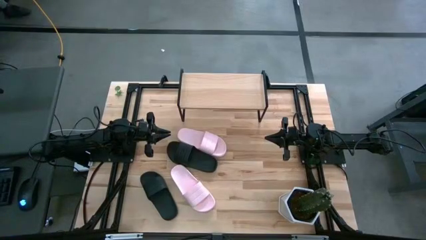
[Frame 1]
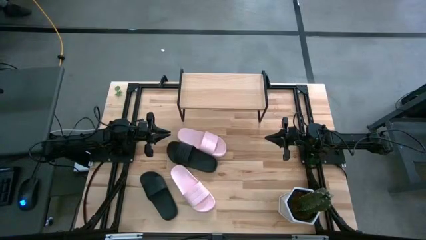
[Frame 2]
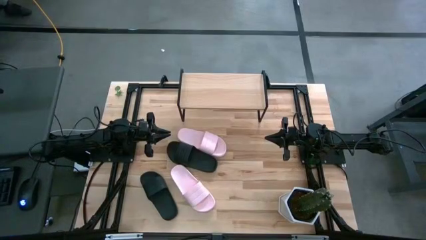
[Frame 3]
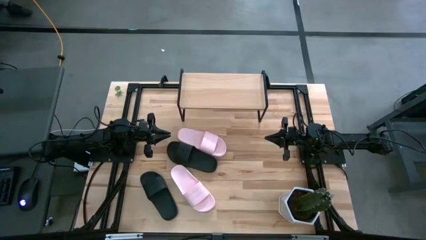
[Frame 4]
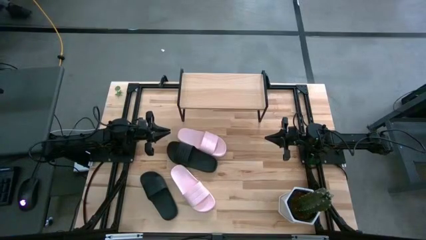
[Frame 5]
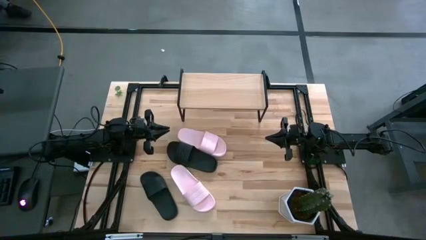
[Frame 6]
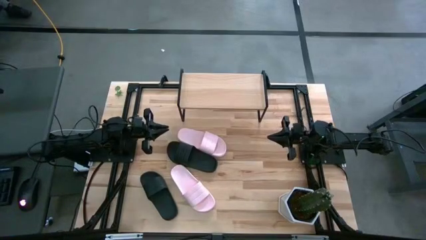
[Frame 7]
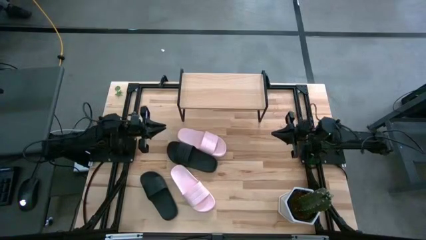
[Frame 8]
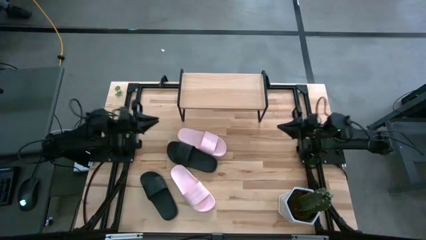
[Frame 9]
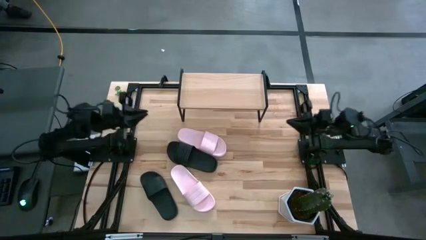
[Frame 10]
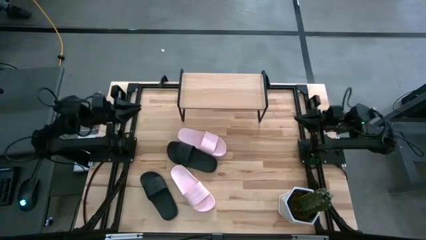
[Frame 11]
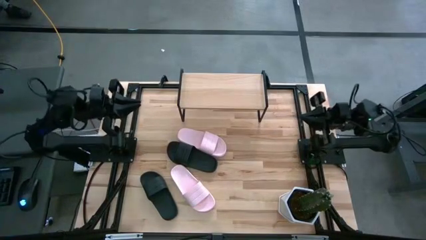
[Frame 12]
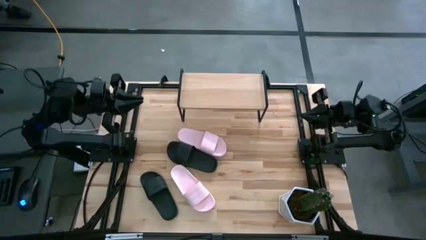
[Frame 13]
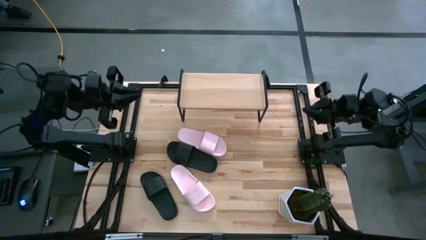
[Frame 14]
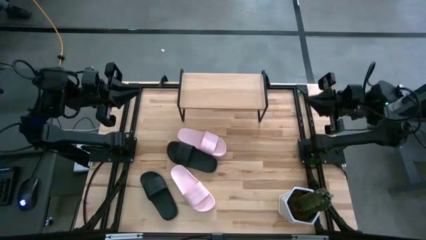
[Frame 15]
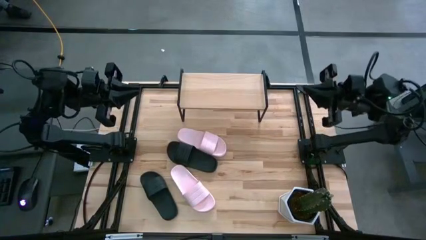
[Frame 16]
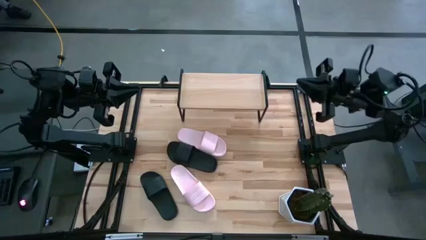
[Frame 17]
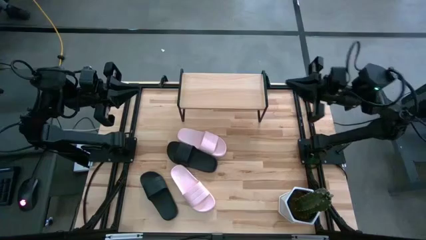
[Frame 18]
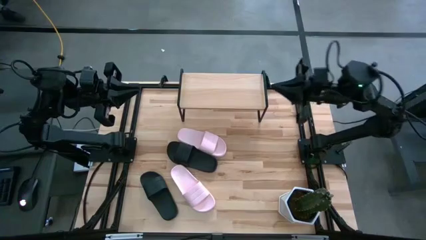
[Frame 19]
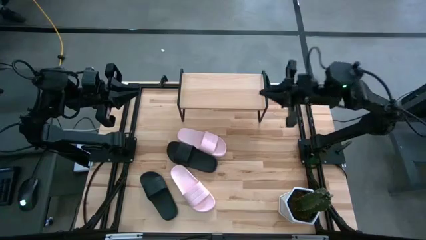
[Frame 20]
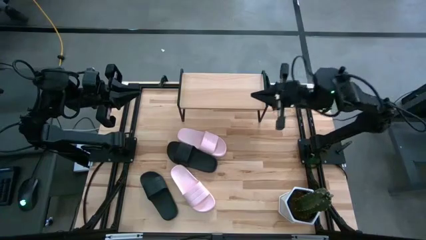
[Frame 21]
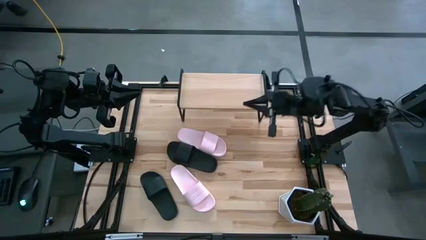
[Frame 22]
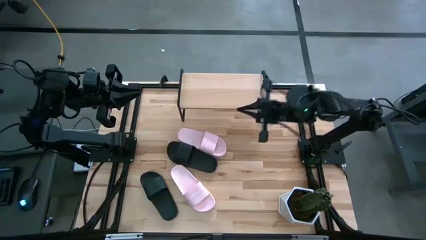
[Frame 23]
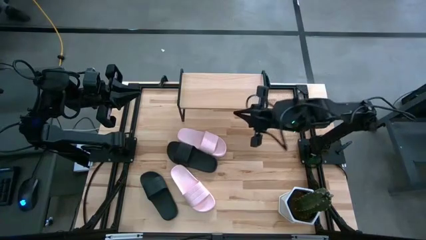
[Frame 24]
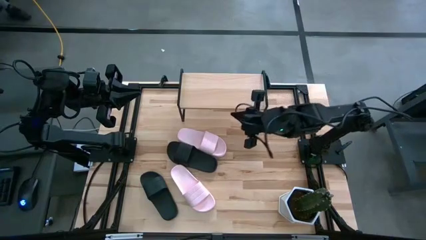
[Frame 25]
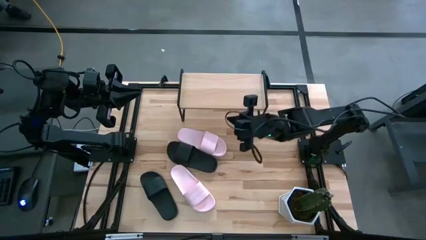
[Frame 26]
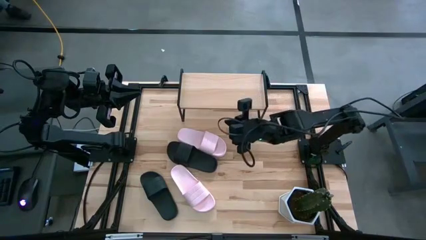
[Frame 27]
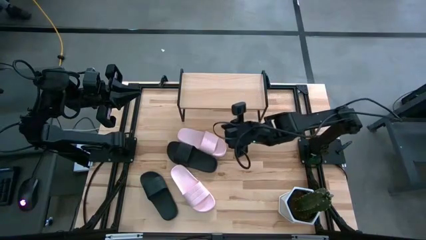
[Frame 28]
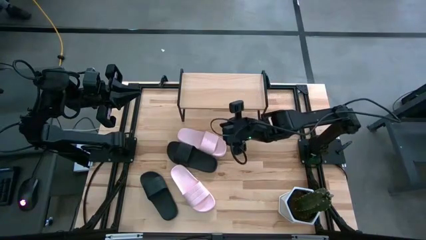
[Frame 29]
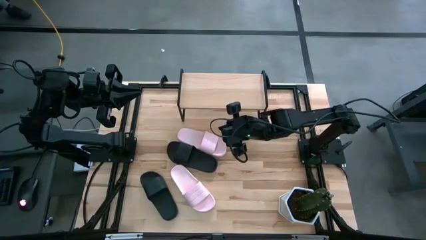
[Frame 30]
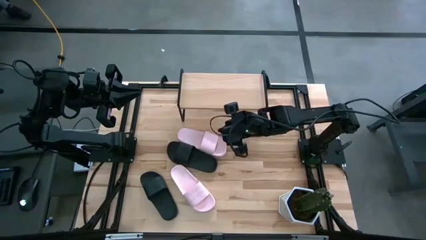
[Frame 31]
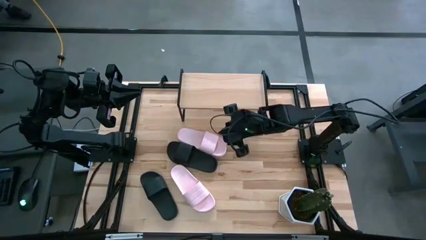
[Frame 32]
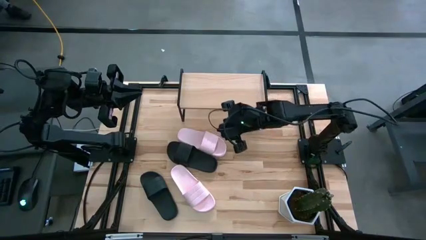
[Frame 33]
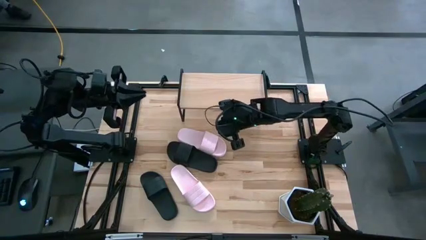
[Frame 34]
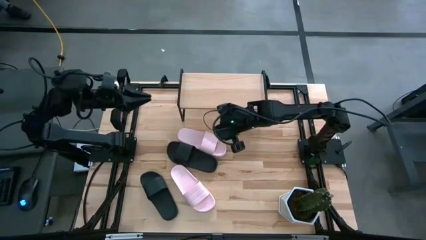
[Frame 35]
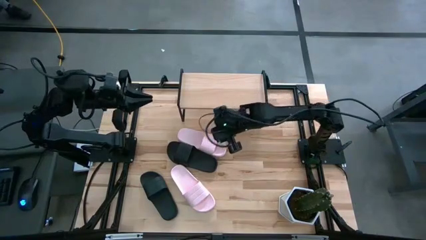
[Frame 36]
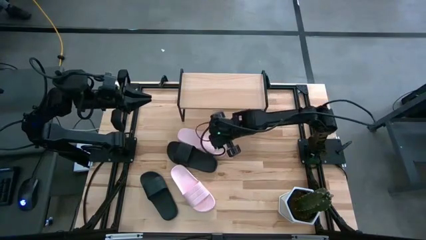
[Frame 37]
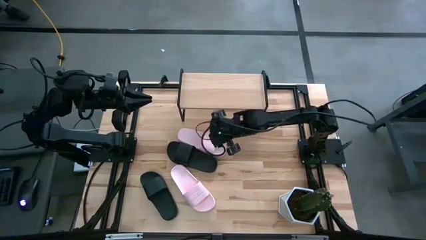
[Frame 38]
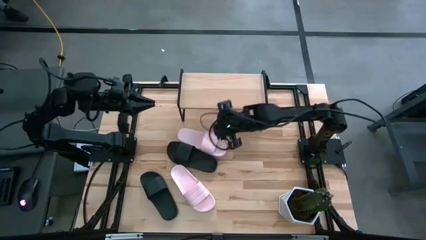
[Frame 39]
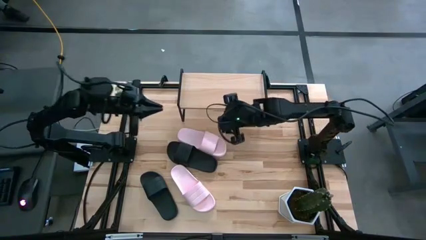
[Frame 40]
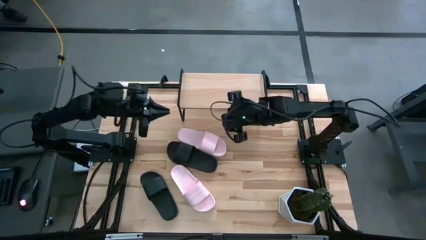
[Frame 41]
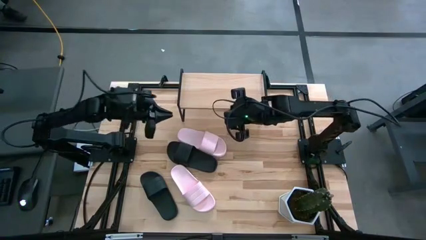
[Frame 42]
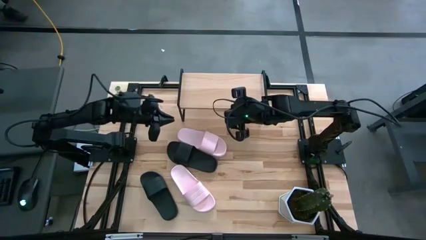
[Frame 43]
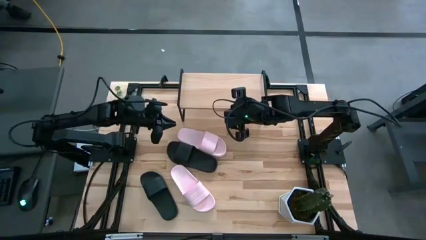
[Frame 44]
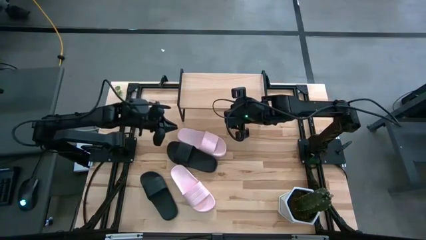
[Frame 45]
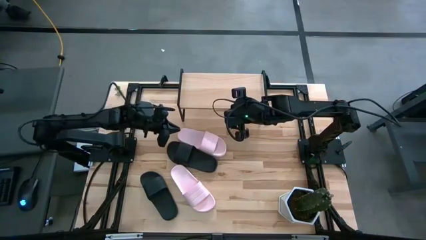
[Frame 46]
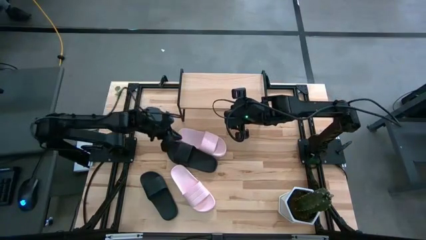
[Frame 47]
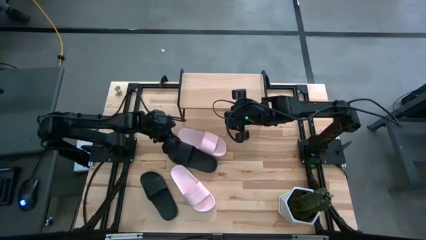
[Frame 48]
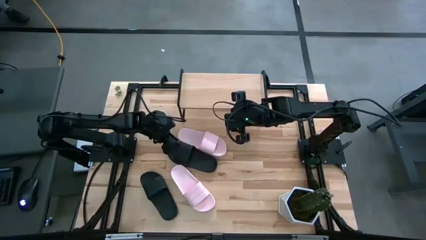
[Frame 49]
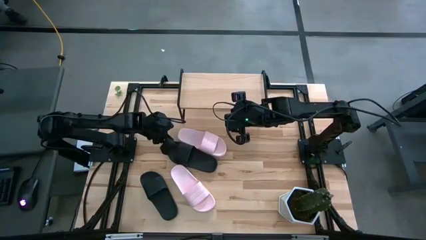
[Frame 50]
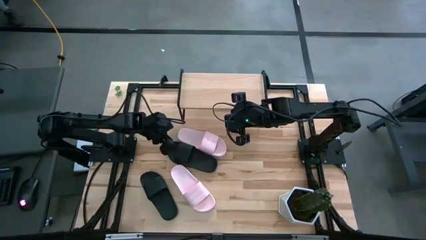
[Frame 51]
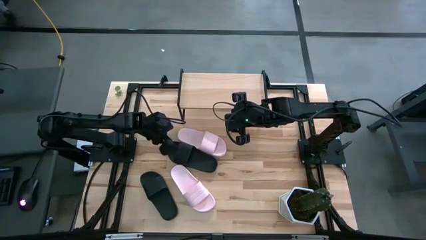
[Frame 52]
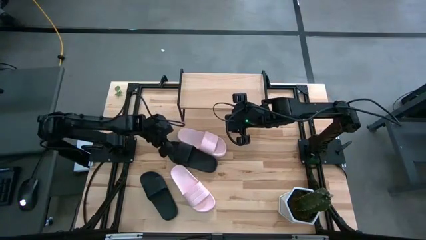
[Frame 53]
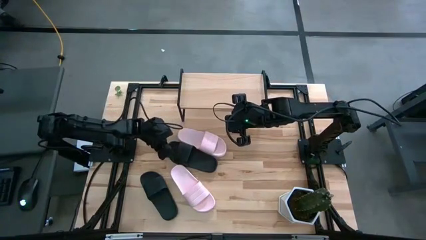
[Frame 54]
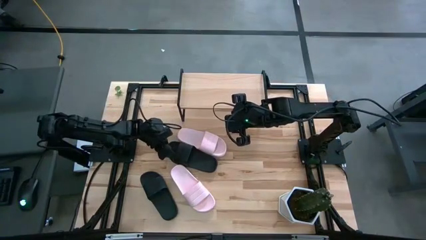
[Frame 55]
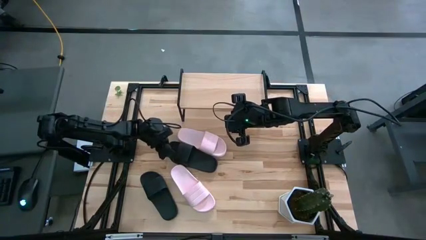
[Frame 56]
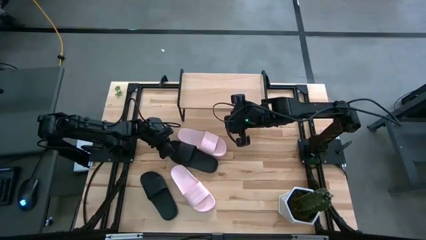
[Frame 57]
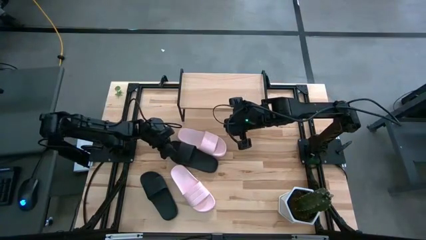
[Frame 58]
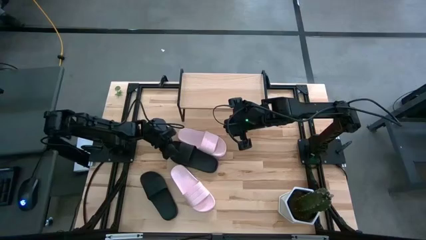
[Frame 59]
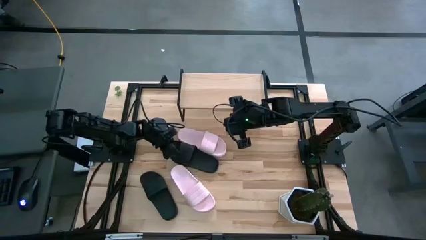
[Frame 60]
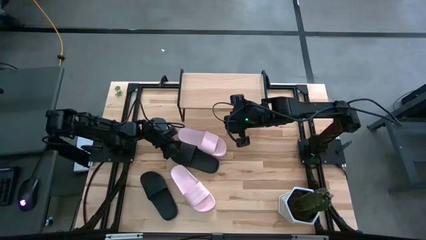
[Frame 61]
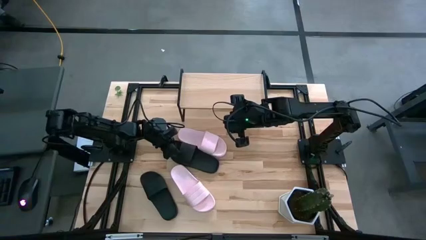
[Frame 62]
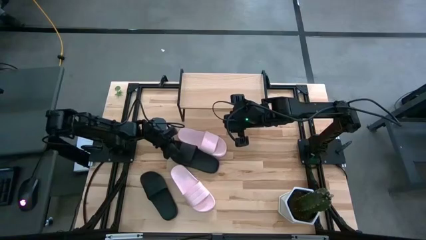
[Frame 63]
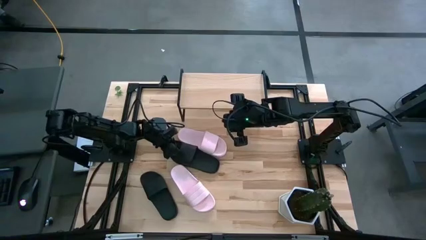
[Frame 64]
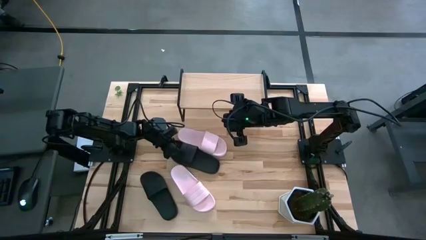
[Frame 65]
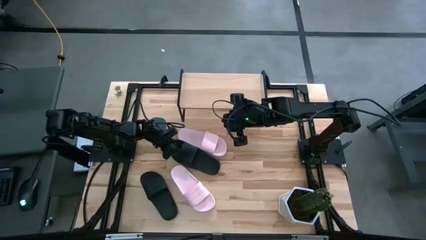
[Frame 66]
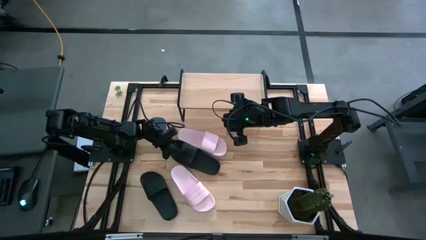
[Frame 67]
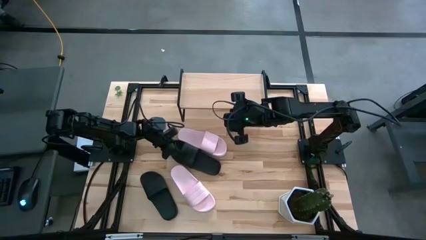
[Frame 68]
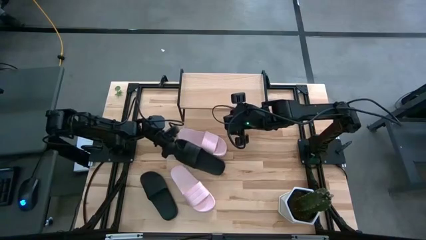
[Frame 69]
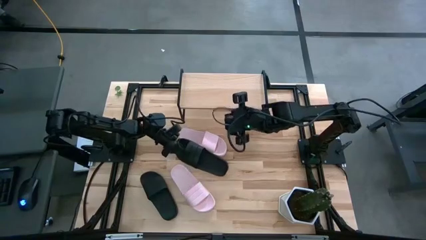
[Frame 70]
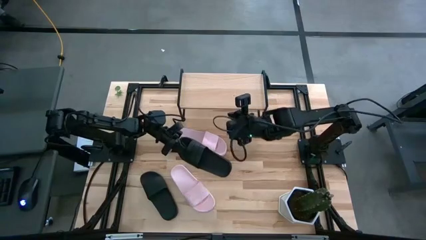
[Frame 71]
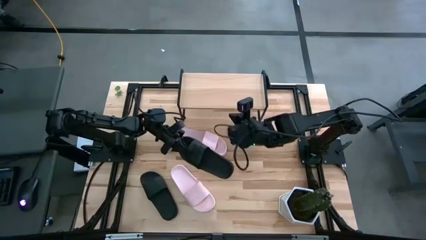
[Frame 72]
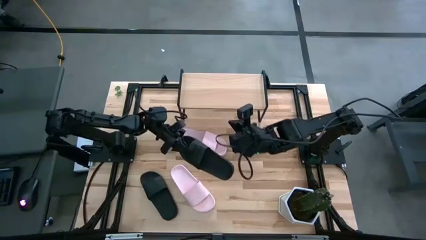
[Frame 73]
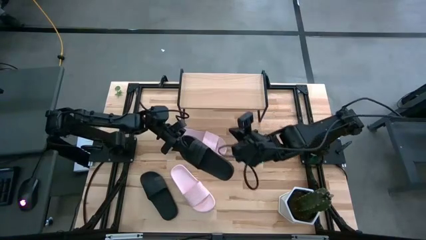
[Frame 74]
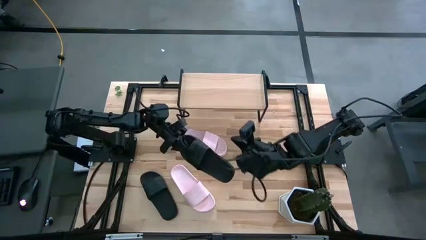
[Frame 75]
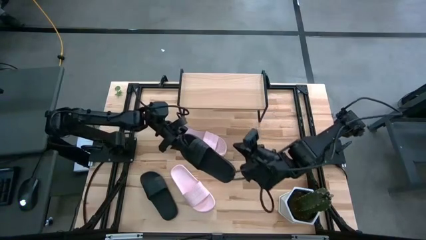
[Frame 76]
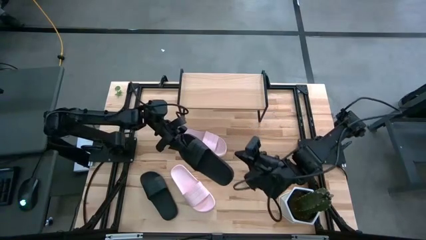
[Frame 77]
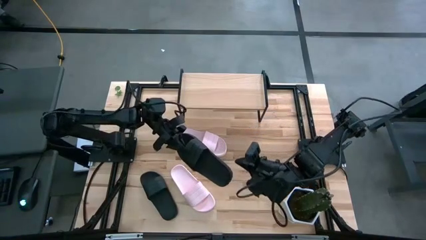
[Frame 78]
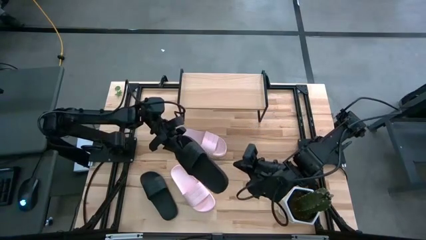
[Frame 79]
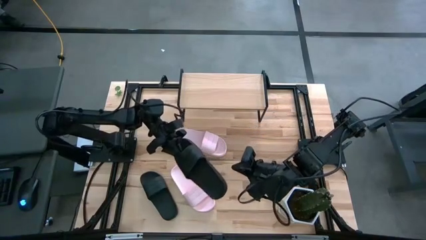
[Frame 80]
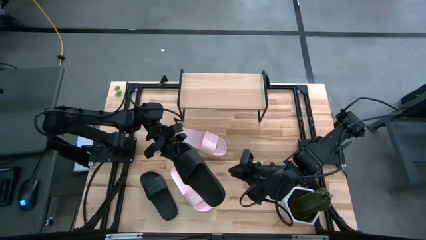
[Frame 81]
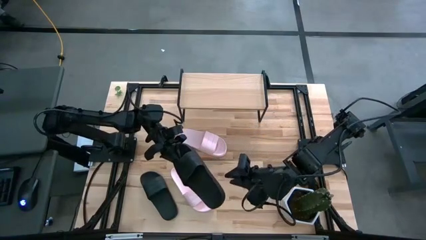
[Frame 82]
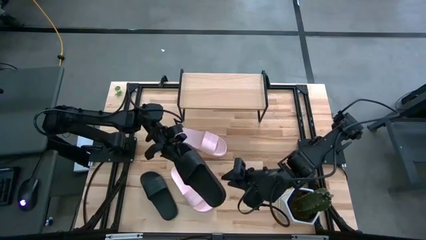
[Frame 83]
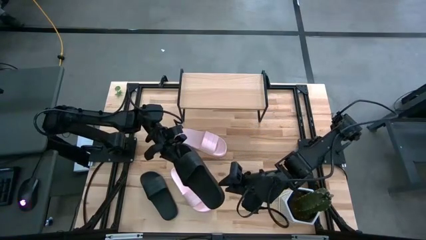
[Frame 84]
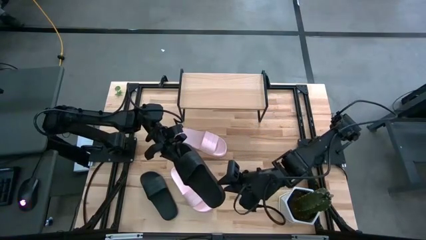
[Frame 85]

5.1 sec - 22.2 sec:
Task: Pick and place slides into the shelf
Put the top black slipper on the shelf
